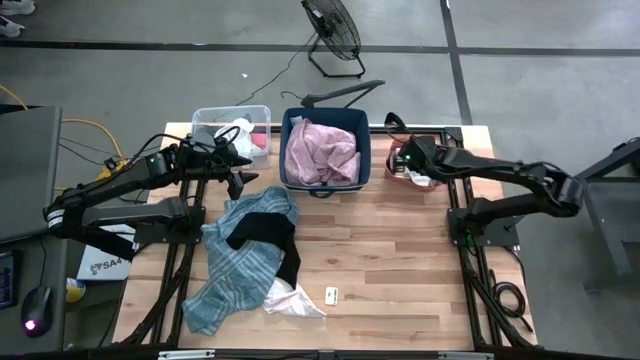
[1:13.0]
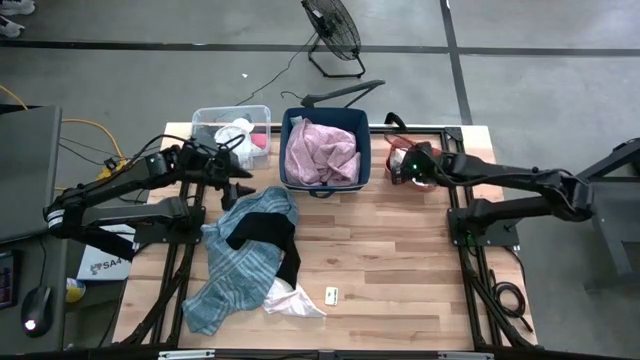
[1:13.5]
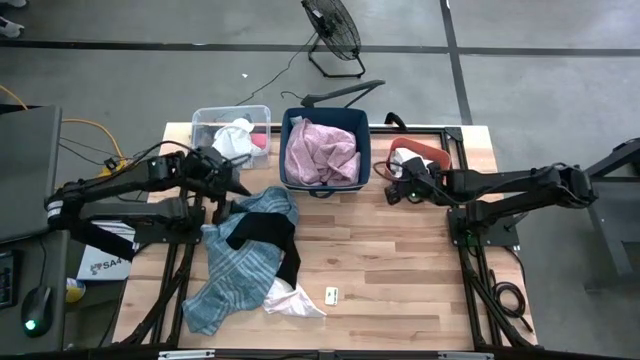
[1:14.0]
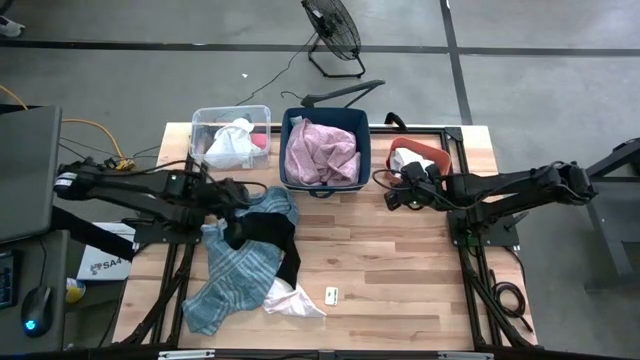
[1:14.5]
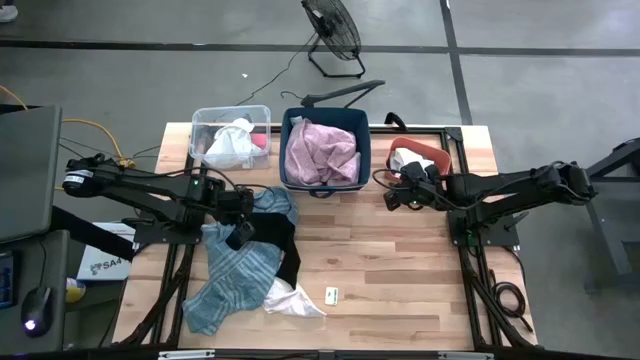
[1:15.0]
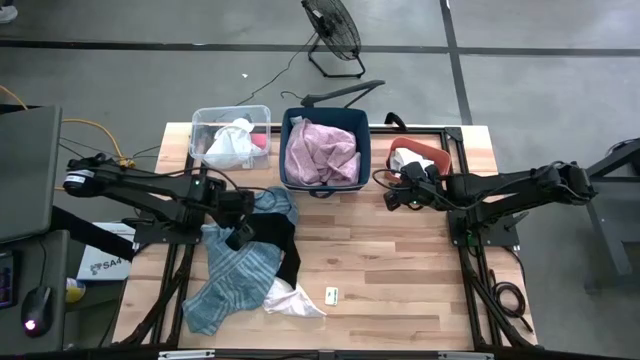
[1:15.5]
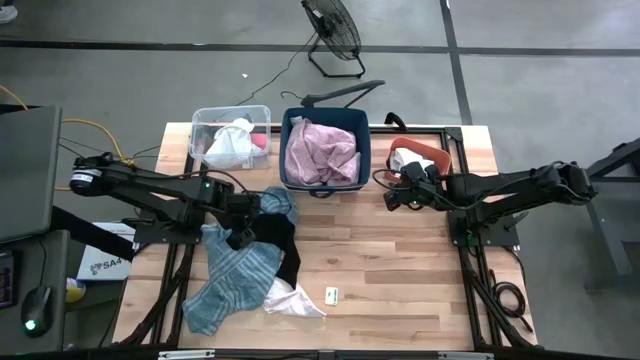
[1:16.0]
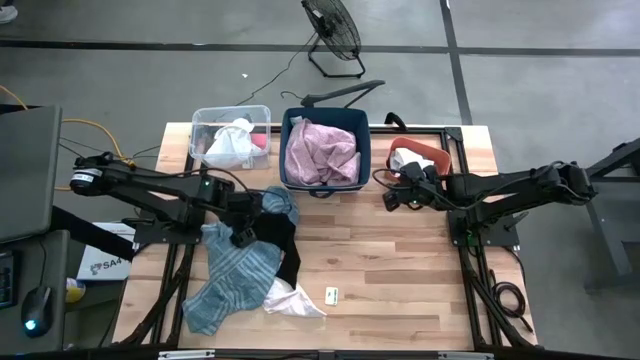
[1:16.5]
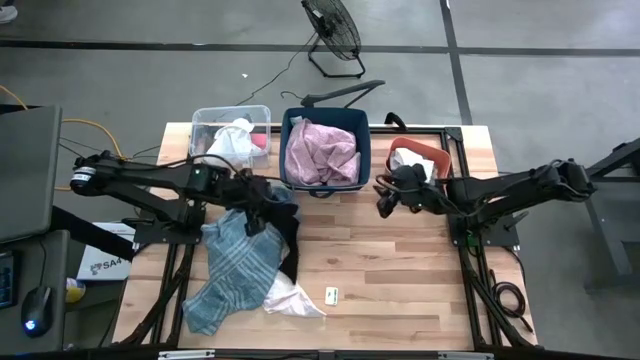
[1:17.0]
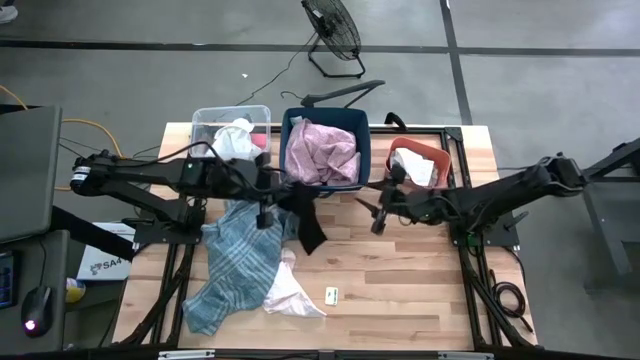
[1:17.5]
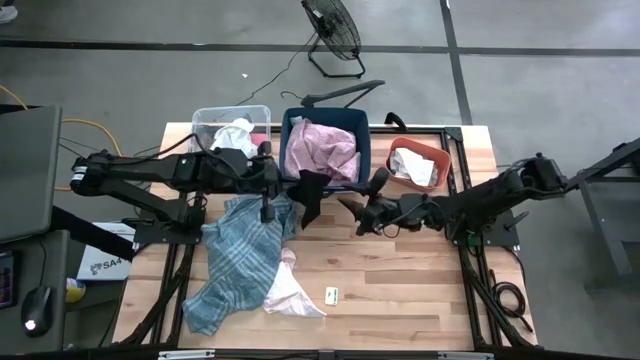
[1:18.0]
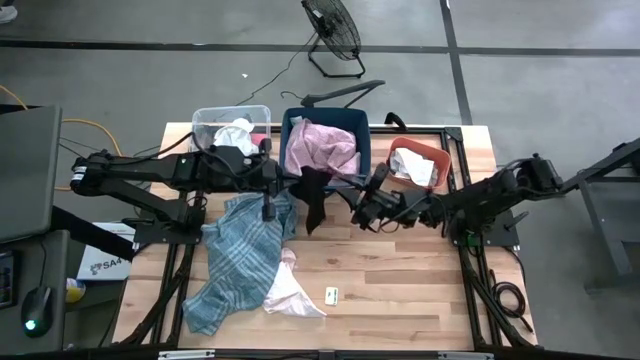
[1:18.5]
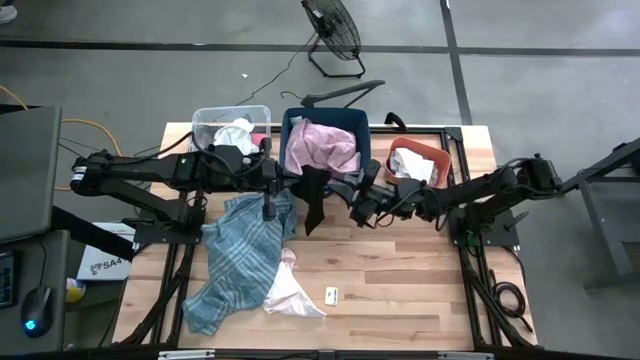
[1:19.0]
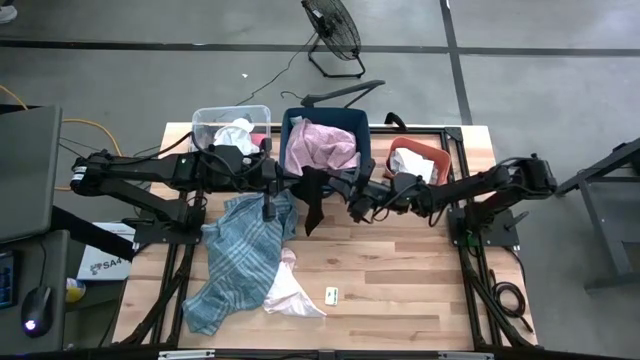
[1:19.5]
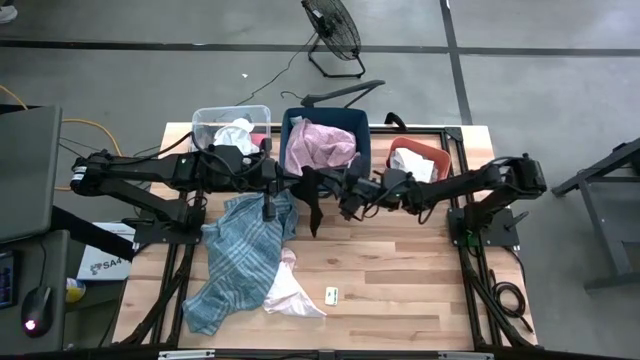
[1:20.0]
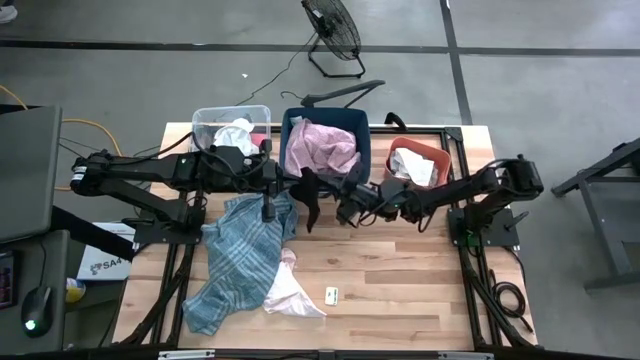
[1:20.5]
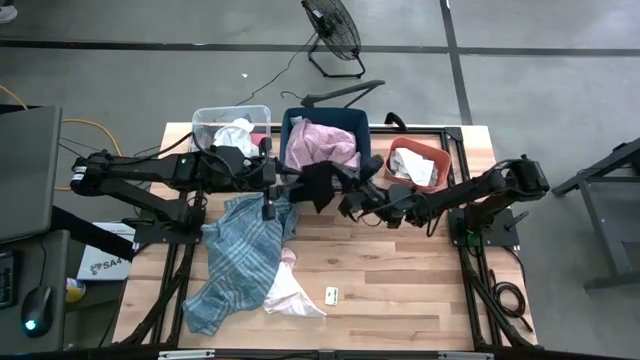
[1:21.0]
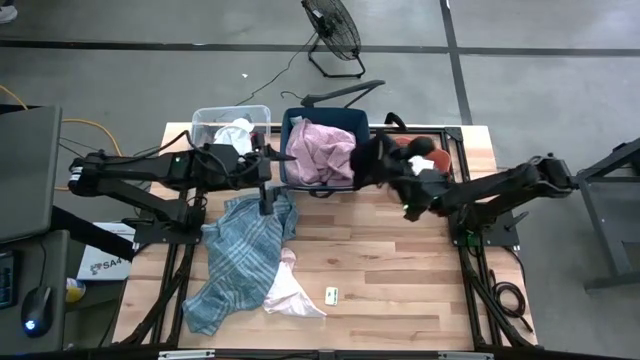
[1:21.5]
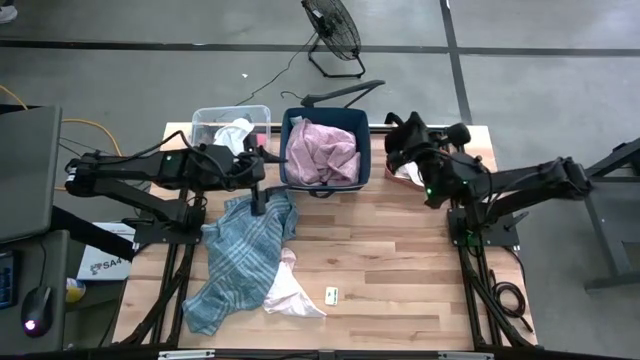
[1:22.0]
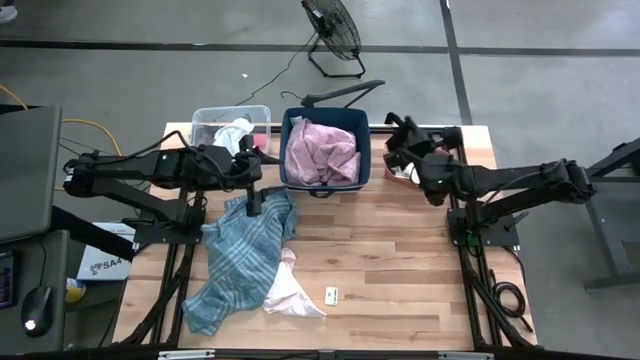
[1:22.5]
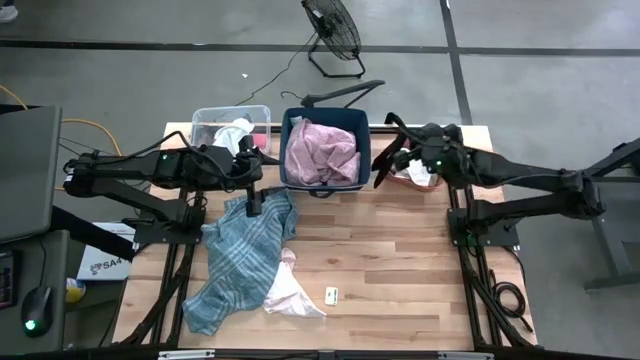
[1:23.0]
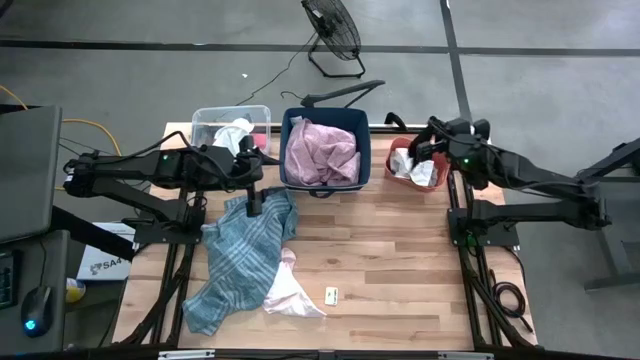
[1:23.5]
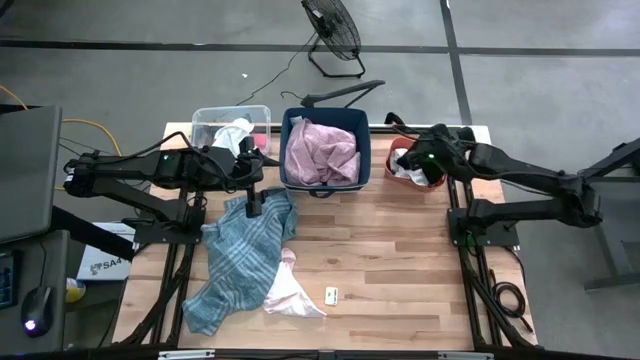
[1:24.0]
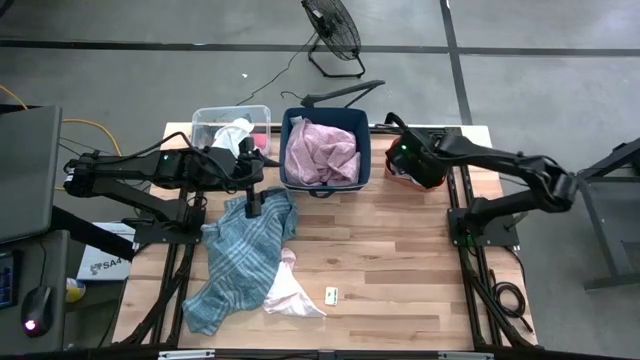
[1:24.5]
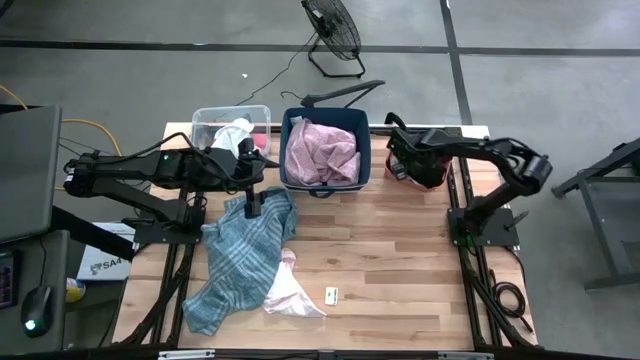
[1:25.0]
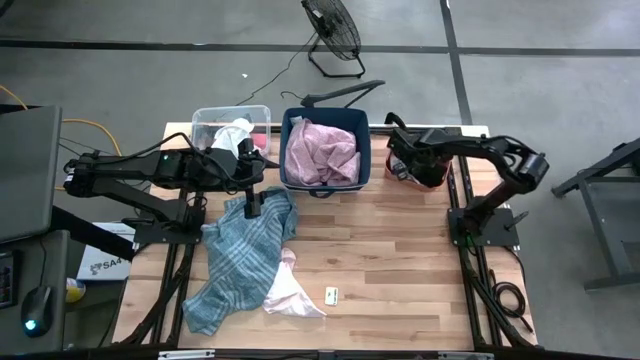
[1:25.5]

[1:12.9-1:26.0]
Task: Pick & Place Cloths
Put the black sock into the orange bin

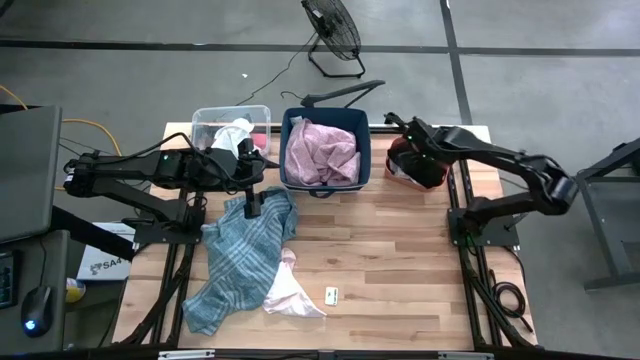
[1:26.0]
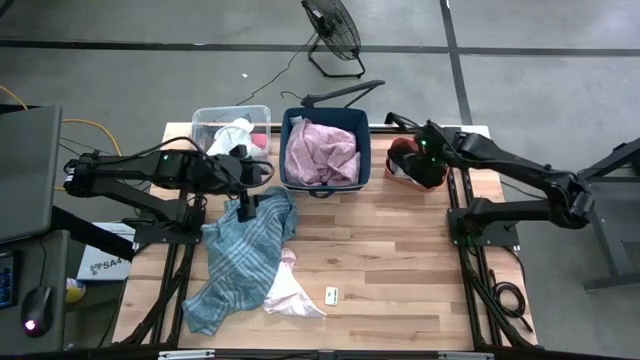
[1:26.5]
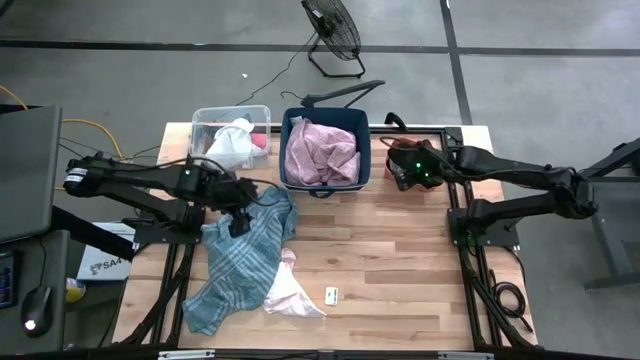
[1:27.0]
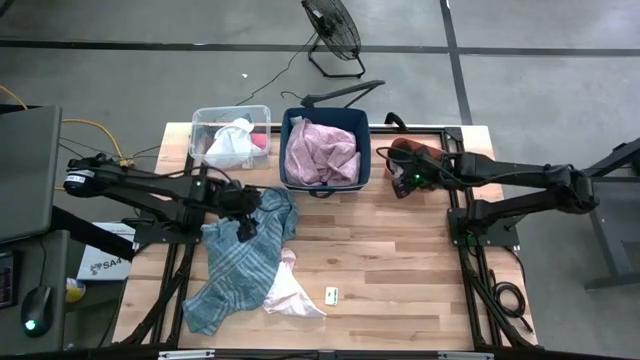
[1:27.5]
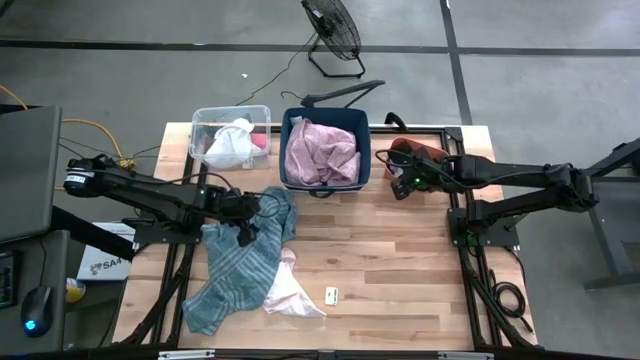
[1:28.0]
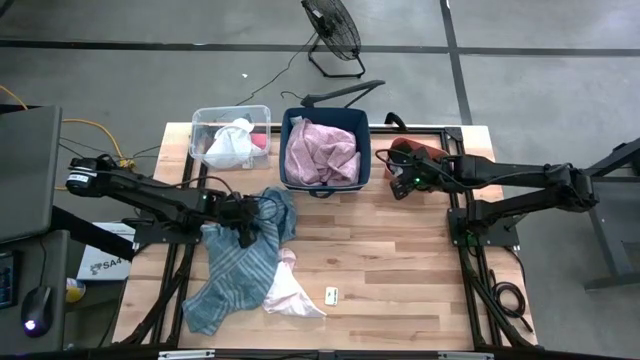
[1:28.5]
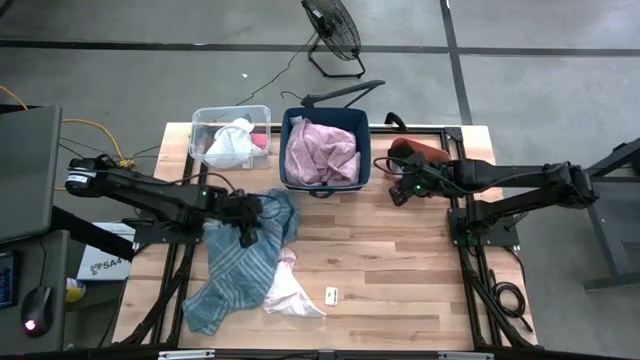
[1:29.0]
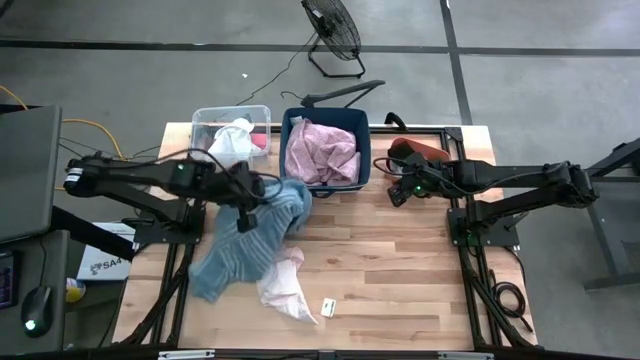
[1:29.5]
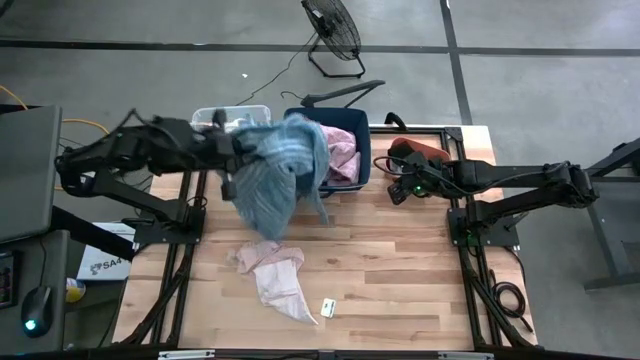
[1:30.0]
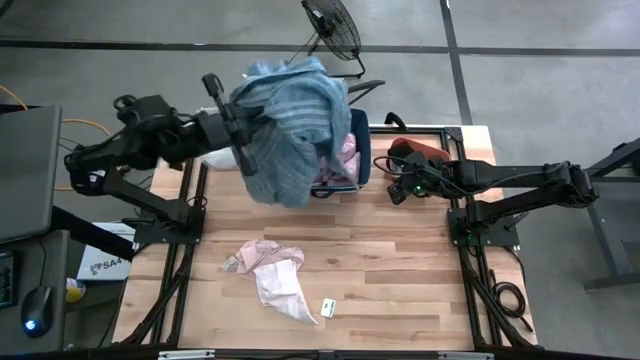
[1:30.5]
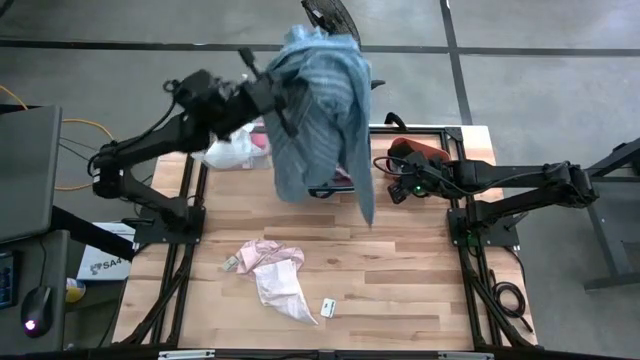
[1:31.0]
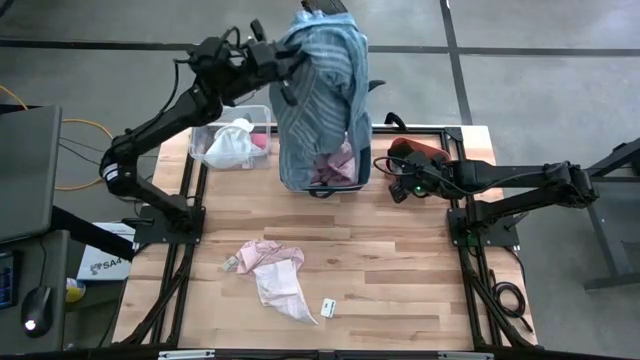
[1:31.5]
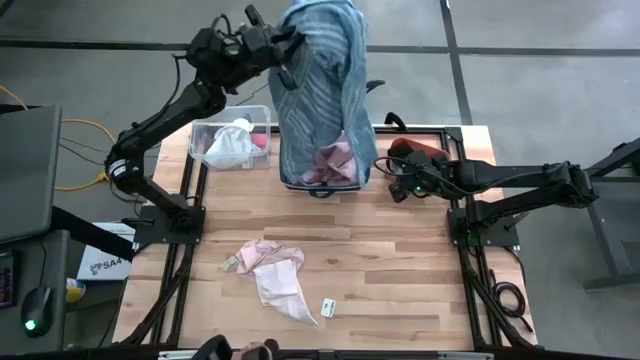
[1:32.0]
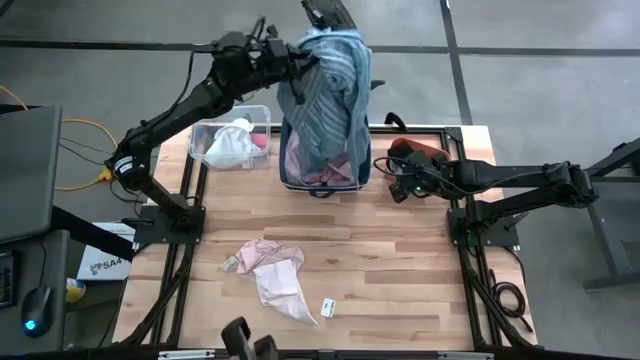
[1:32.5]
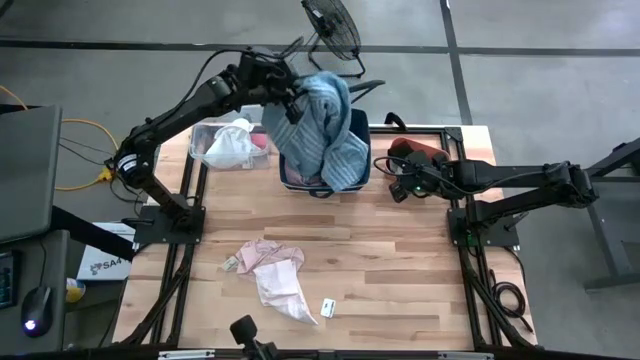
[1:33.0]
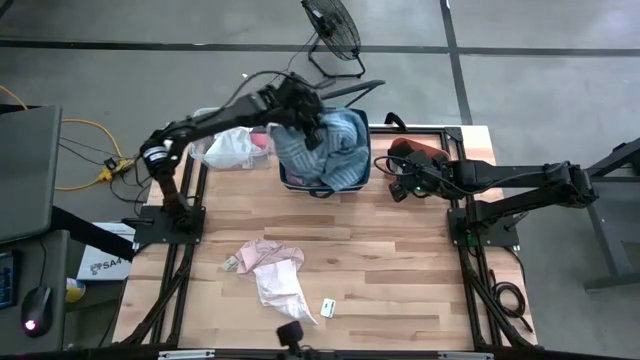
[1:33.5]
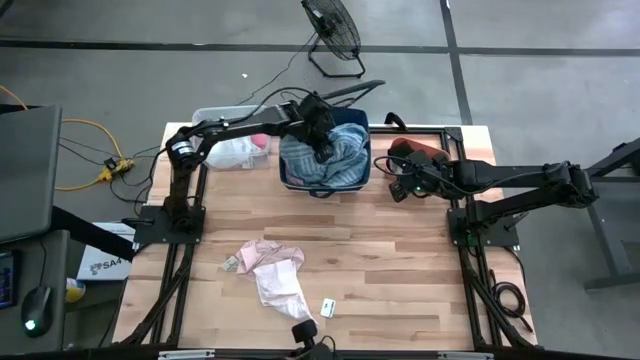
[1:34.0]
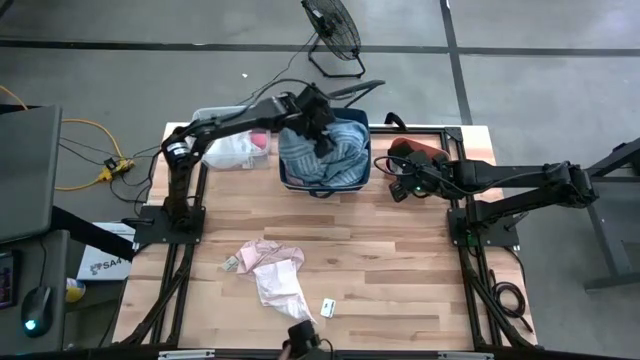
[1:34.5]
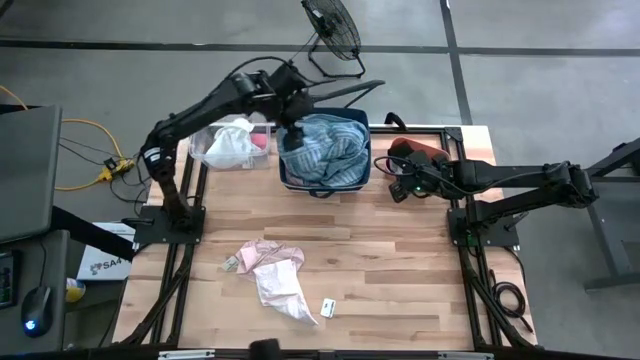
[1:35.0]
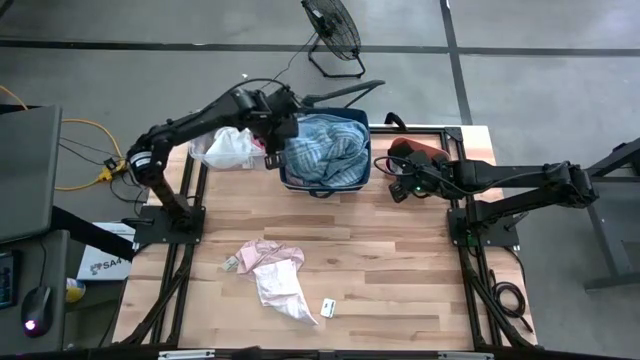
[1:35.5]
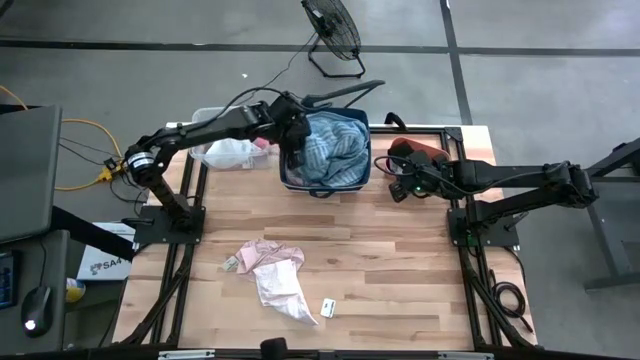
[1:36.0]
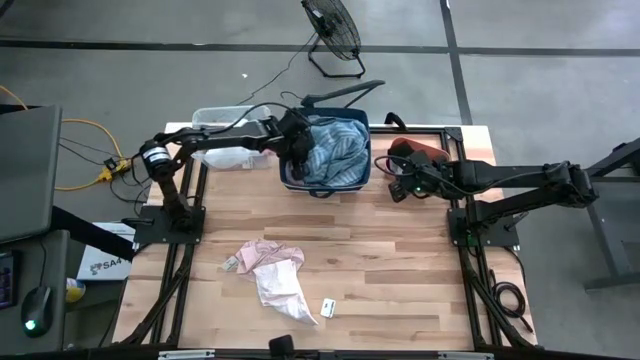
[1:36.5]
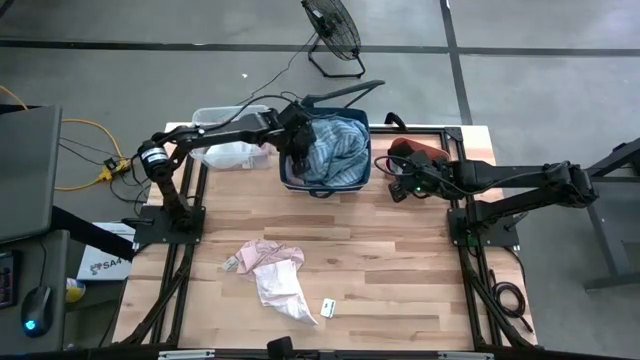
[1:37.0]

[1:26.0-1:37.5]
Put the blue shirt into the blue bin
